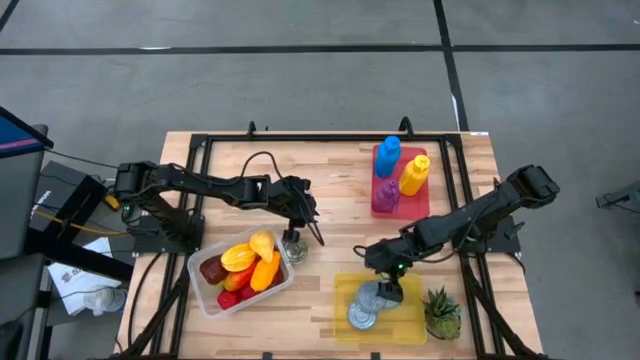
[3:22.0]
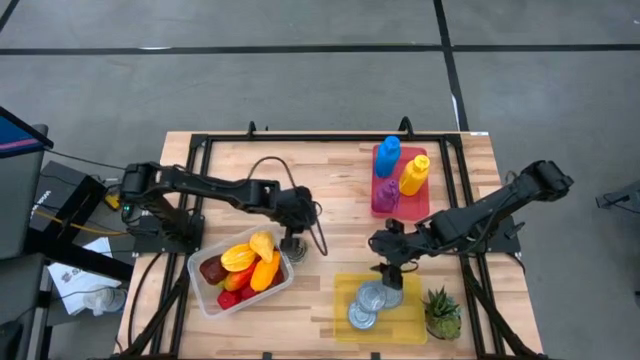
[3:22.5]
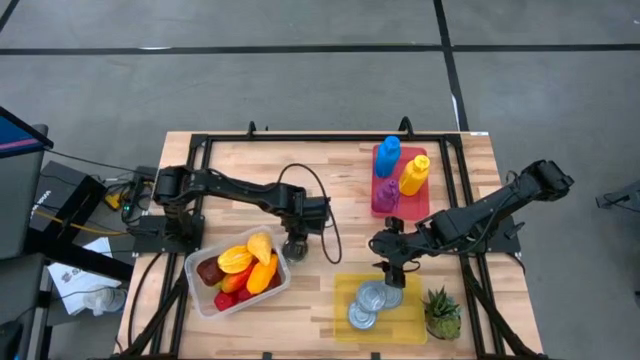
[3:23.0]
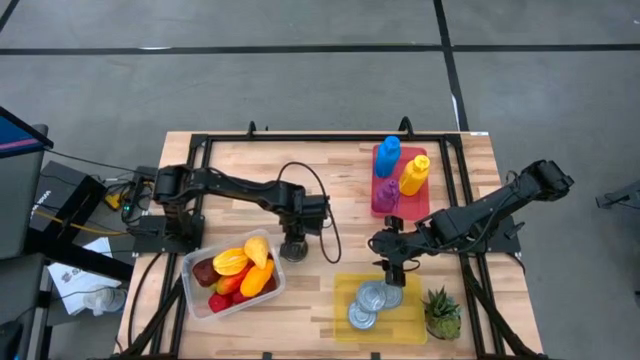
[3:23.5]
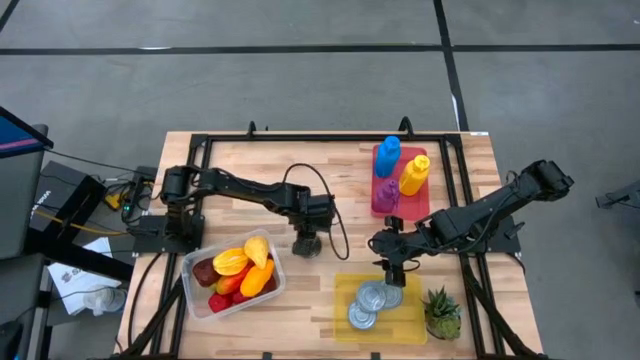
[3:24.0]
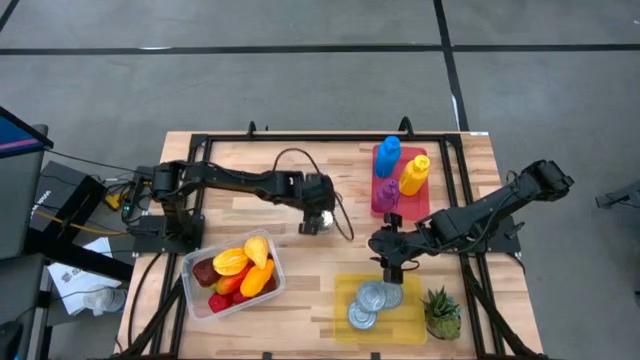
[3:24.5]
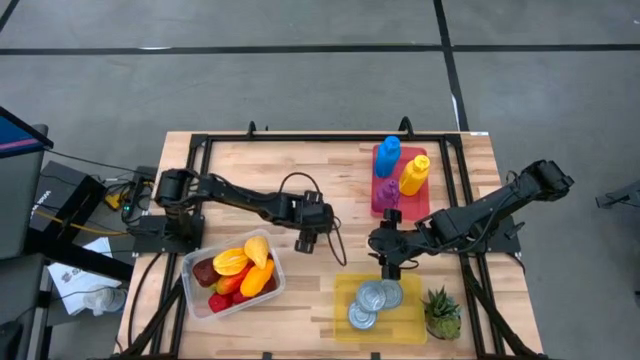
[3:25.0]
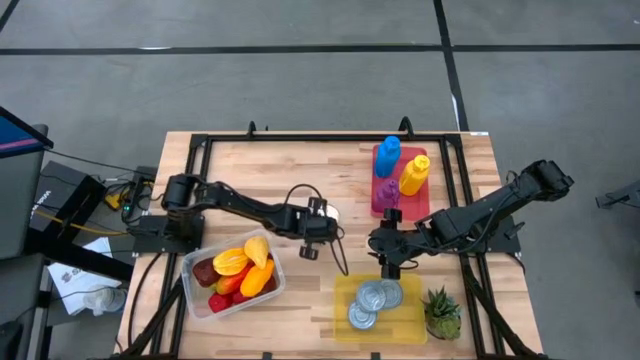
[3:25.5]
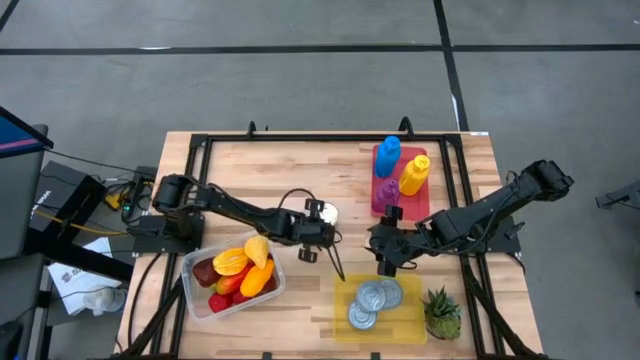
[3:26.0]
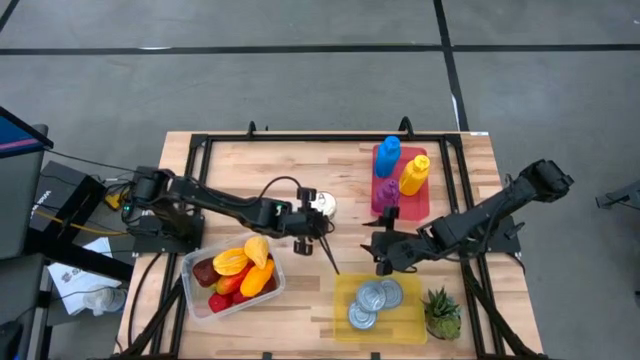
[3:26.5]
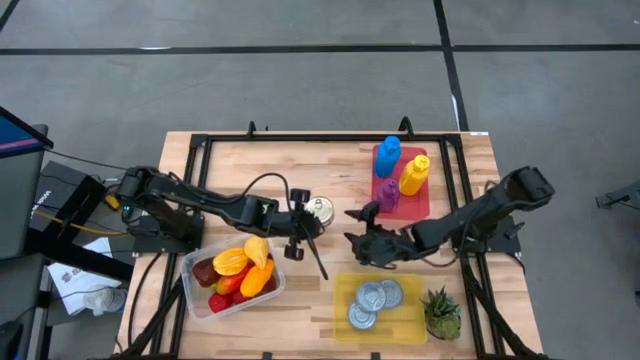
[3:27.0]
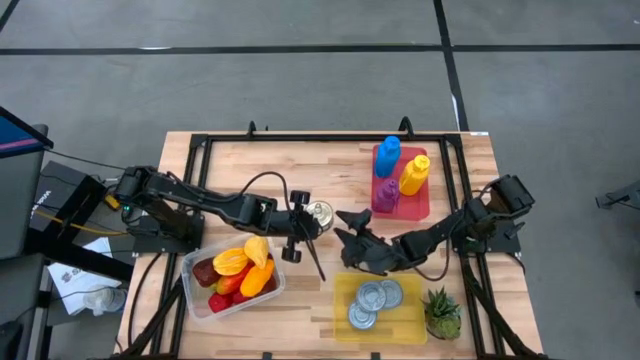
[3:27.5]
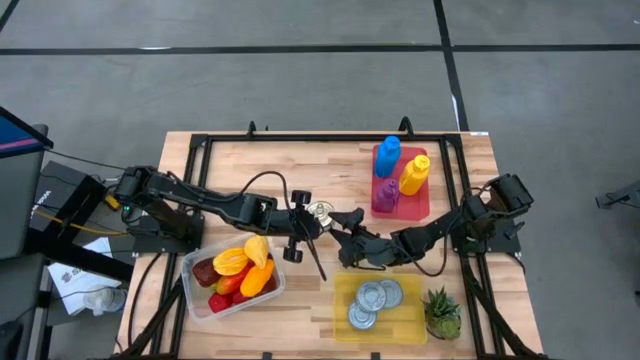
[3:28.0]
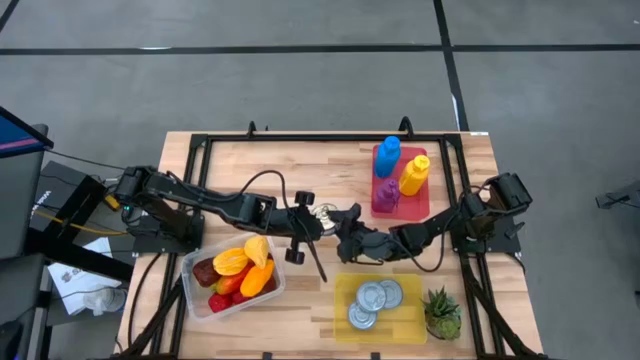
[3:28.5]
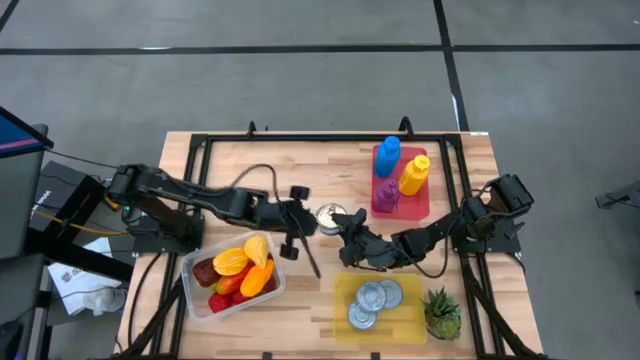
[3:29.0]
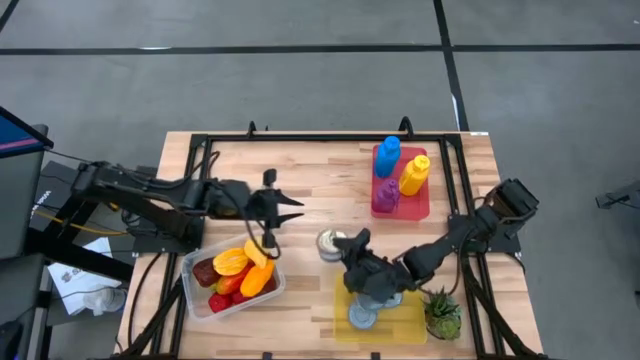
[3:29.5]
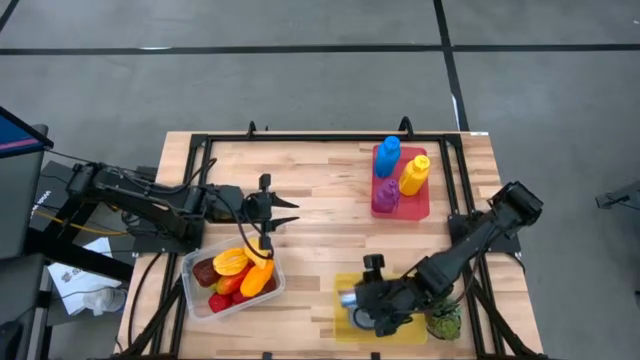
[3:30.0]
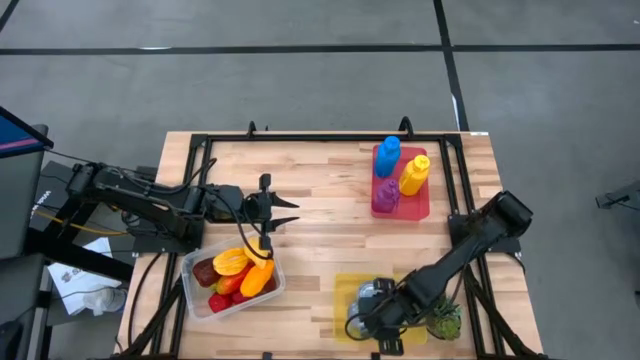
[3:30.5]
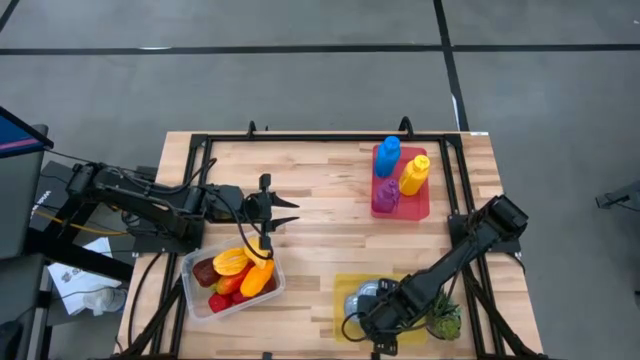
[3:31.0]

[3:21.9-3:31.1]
Task: Pick & Place Food Item
Put the blue and pink tuna can into the yellow bin

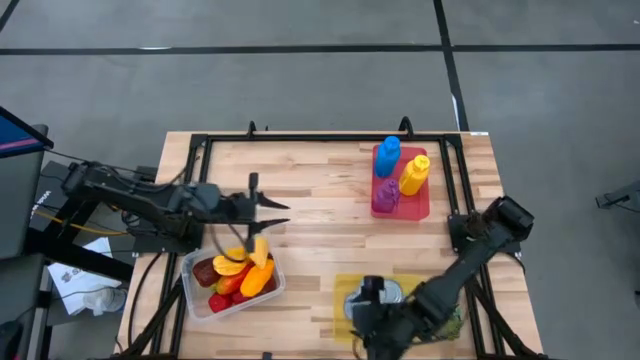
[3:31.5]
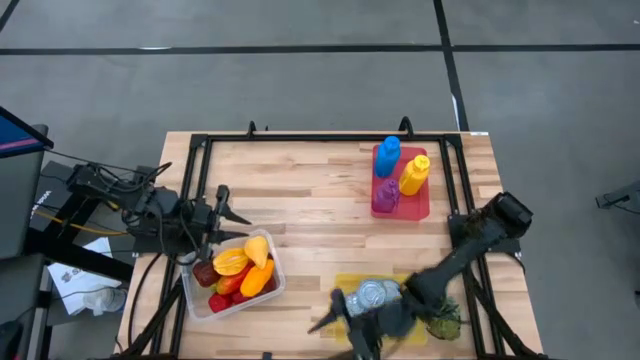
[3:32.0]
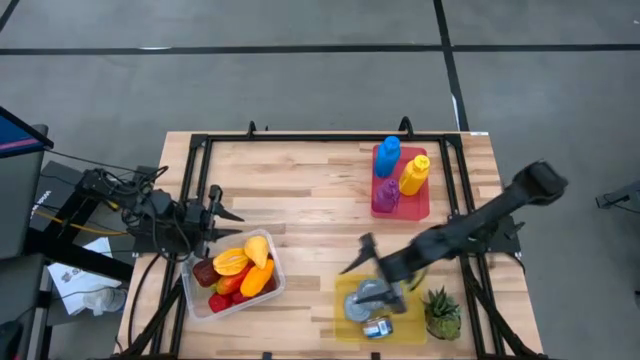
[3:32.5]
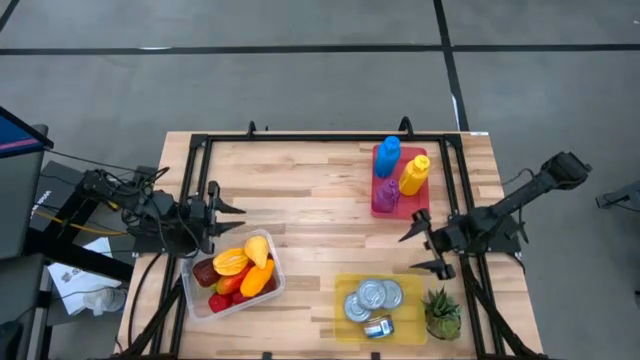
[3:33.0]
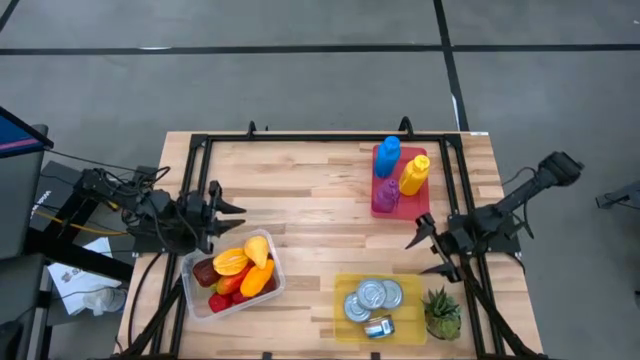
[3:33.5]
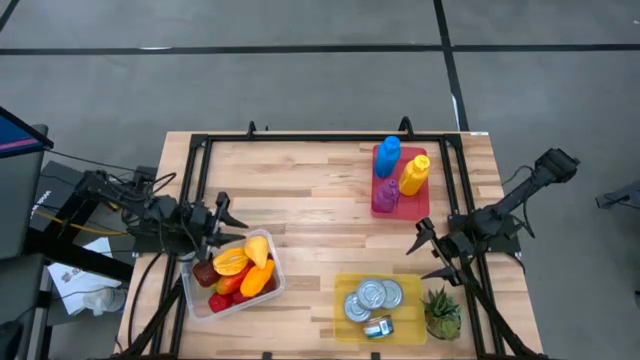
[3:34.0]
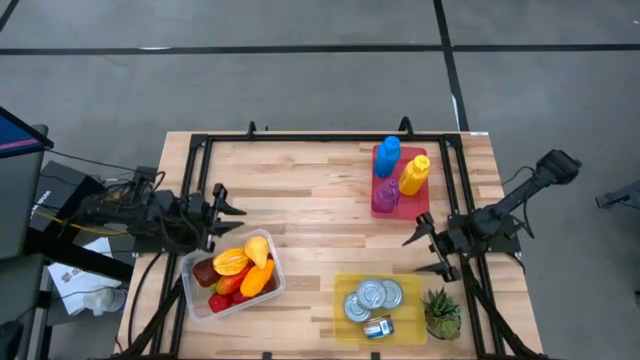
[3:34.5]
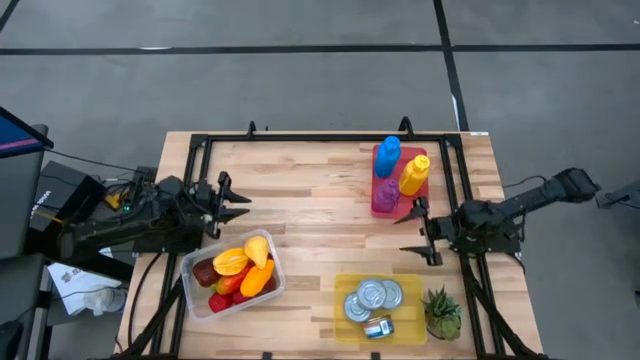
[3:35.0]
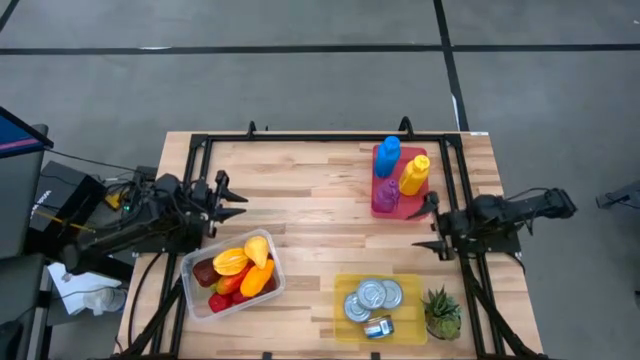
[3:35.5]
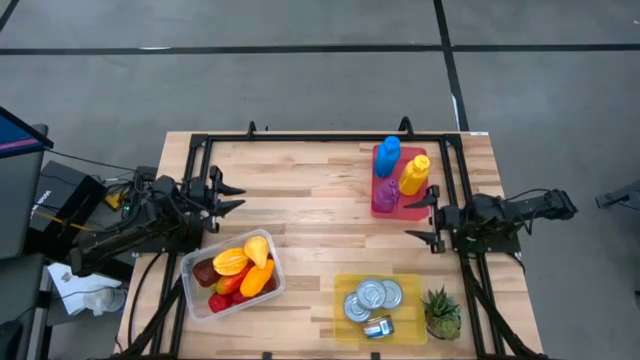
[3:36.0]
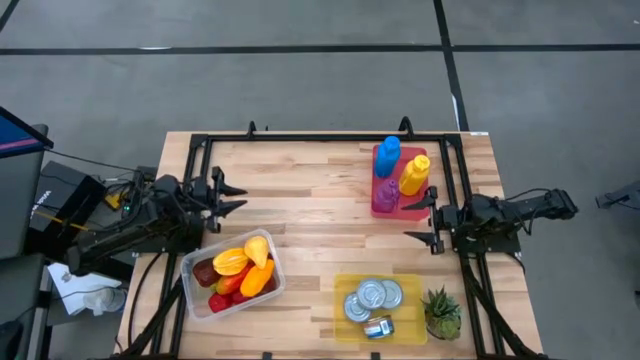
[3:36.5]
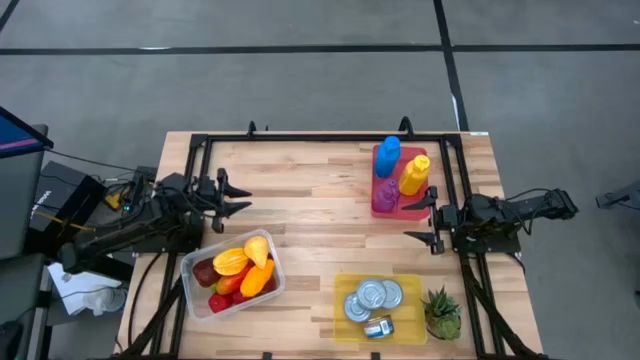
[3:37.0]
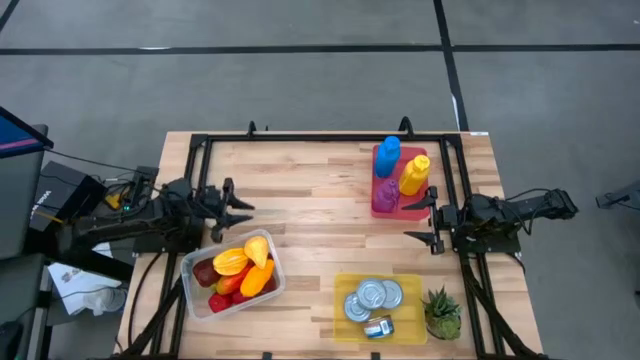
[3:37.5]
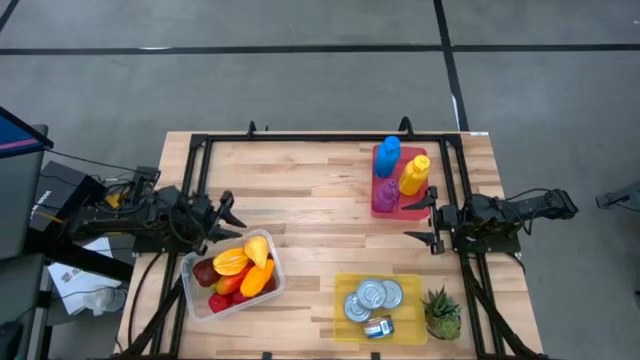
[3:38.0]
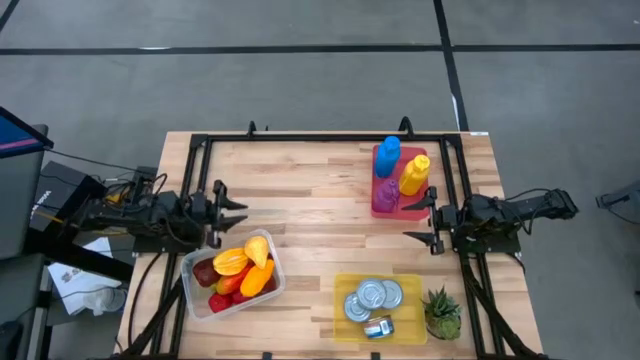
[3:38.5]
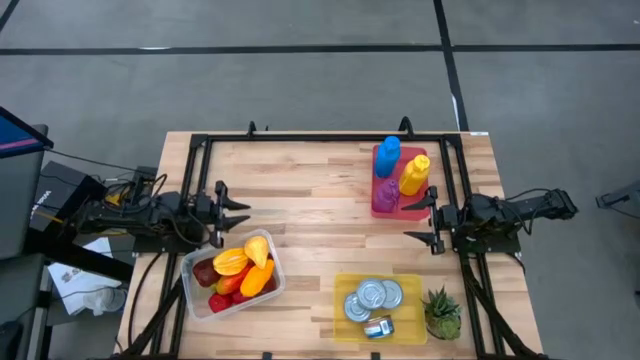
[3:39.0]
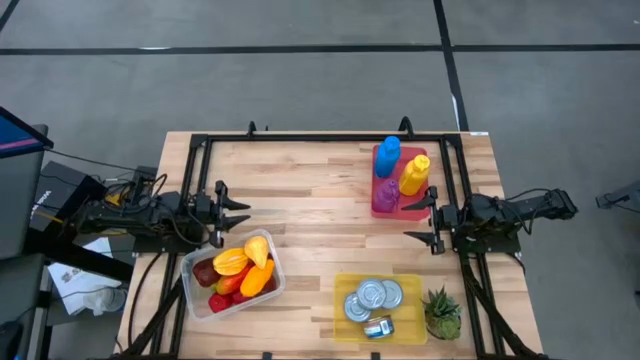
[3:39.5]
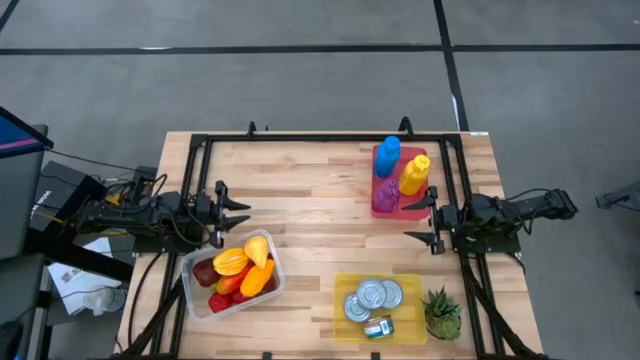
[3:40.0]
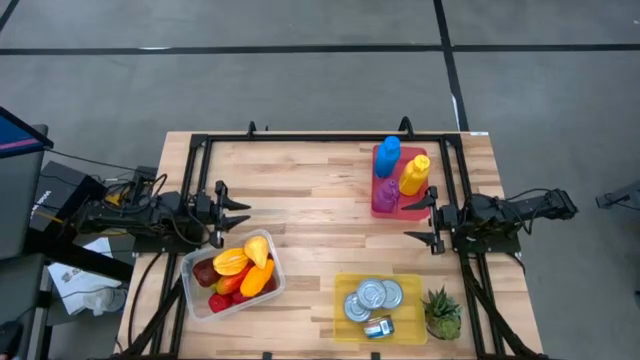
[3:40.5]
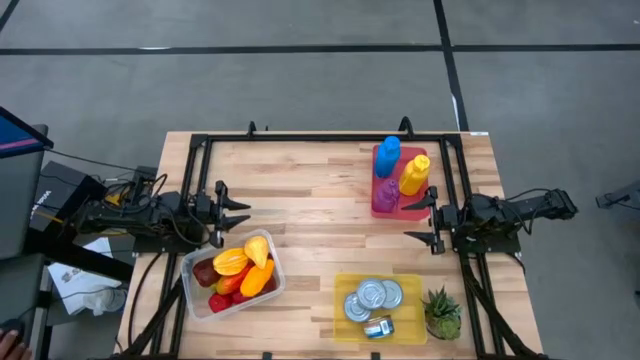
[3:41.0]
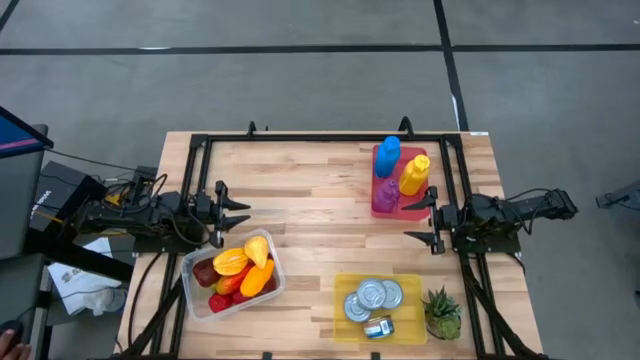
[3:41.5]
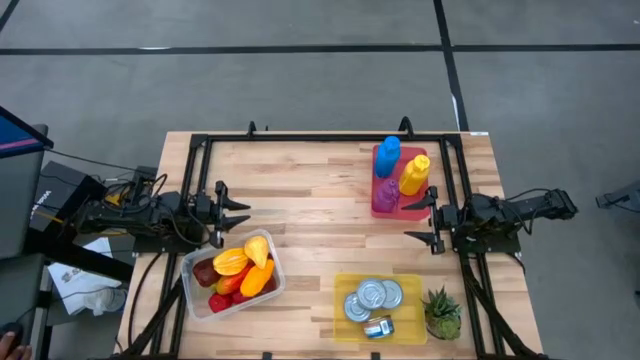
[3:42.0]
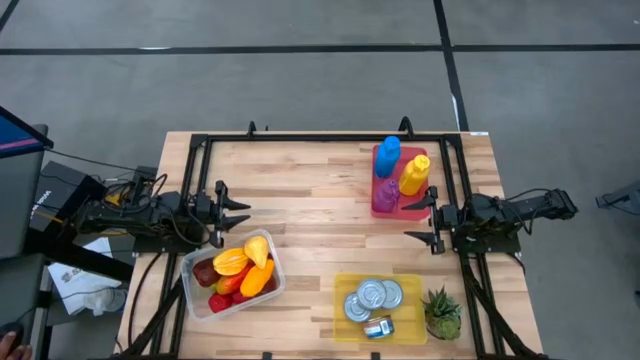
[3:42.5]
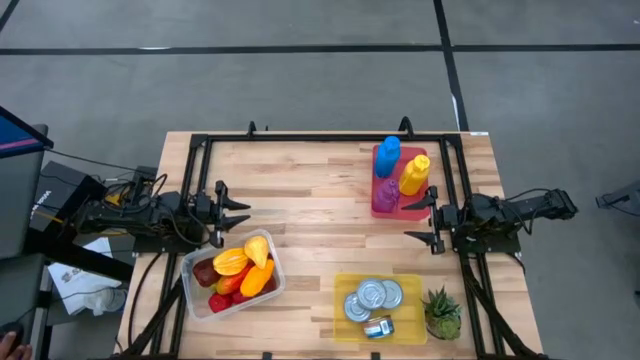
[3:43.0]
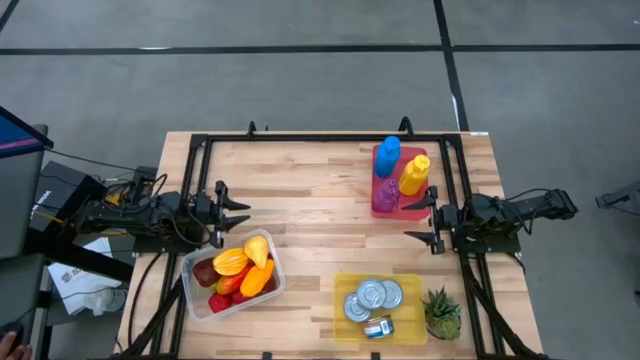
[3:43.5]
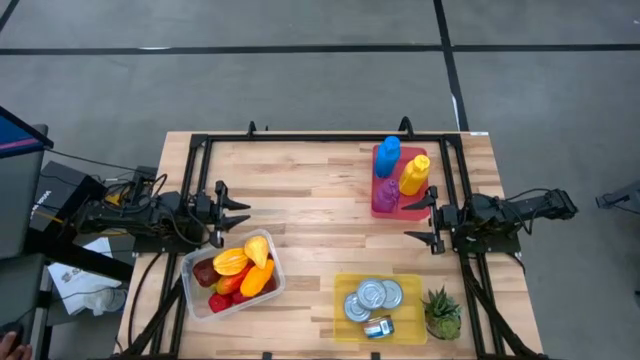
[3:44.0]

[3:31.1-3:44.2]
Return to Home Position
